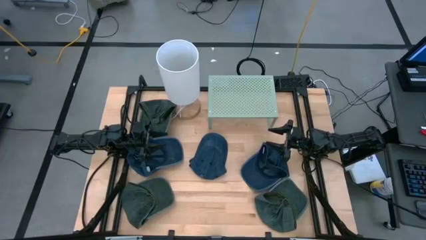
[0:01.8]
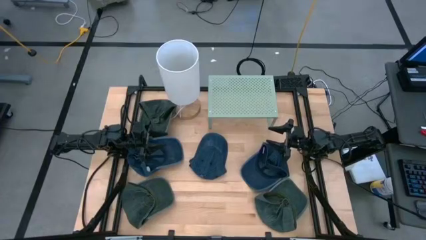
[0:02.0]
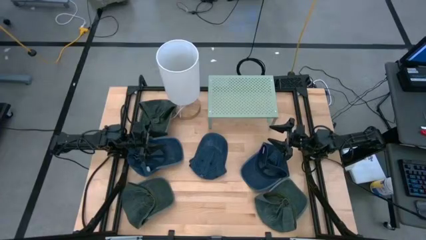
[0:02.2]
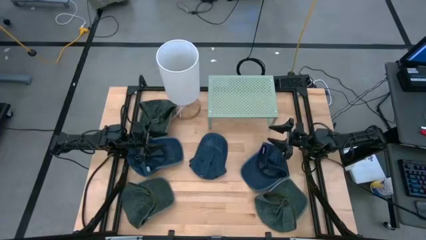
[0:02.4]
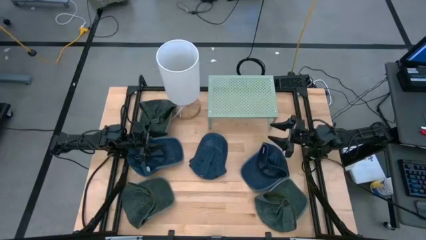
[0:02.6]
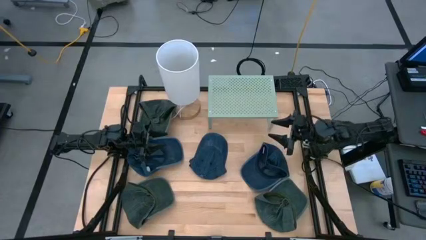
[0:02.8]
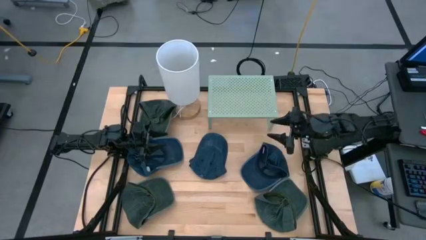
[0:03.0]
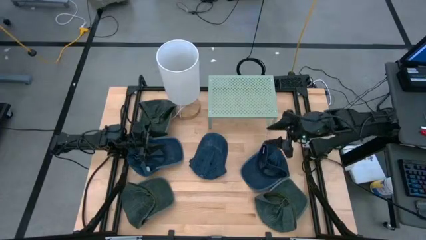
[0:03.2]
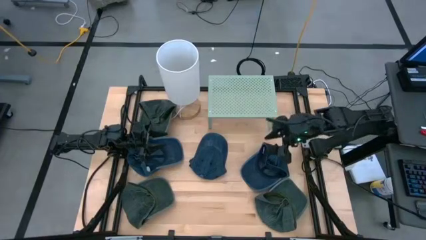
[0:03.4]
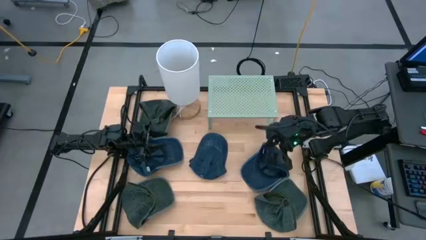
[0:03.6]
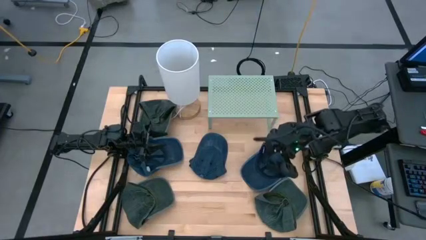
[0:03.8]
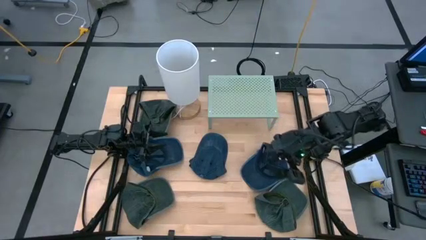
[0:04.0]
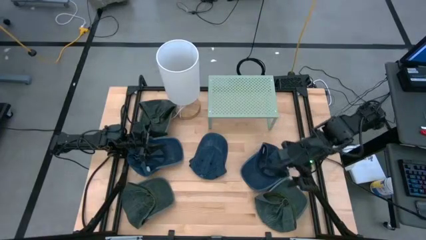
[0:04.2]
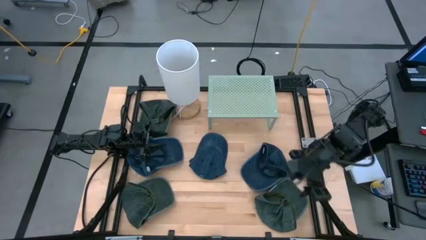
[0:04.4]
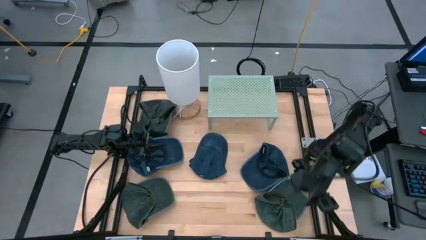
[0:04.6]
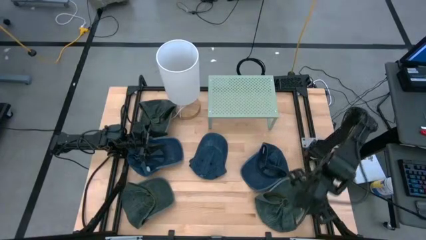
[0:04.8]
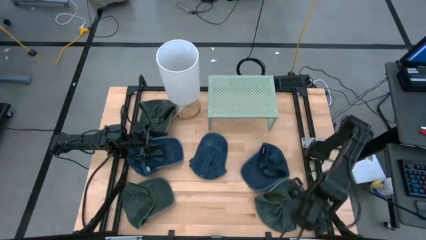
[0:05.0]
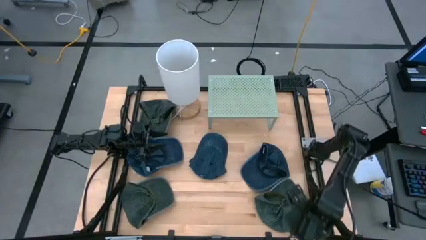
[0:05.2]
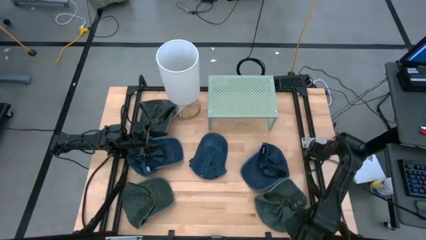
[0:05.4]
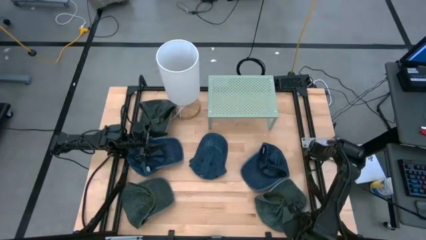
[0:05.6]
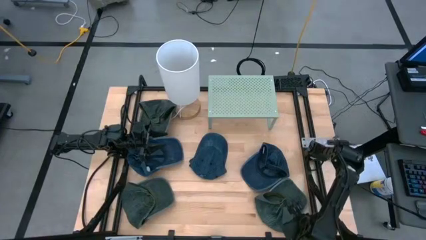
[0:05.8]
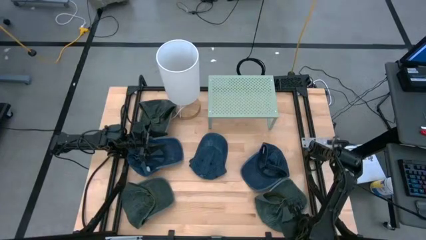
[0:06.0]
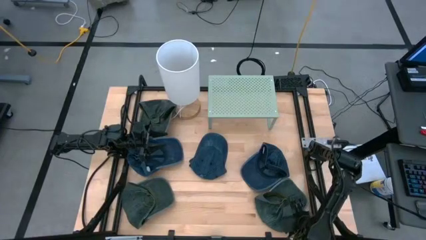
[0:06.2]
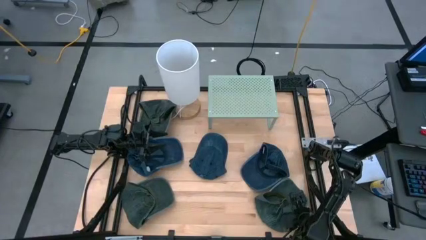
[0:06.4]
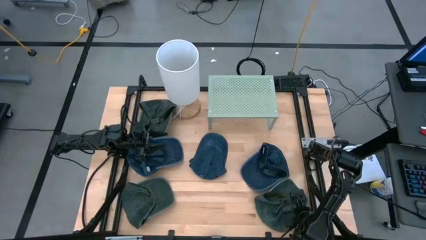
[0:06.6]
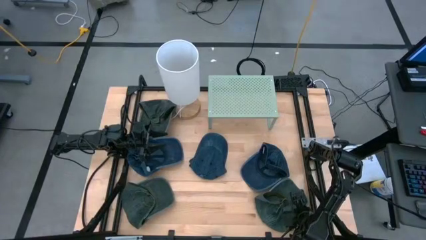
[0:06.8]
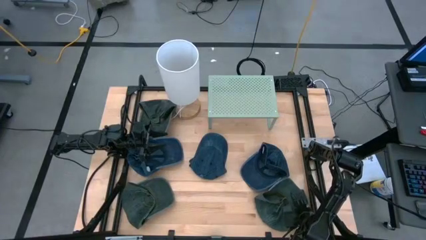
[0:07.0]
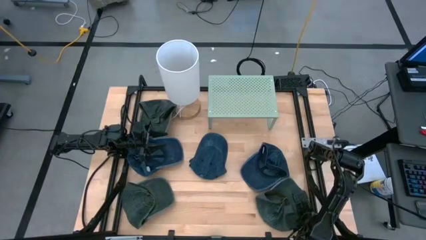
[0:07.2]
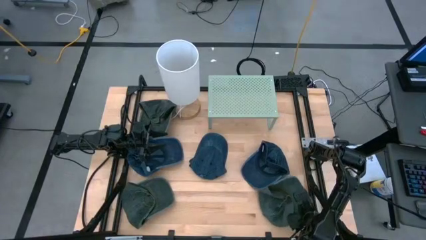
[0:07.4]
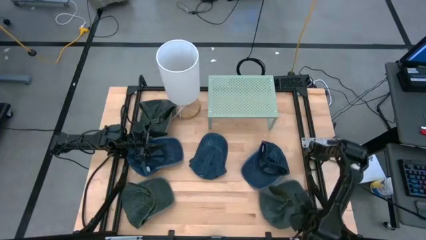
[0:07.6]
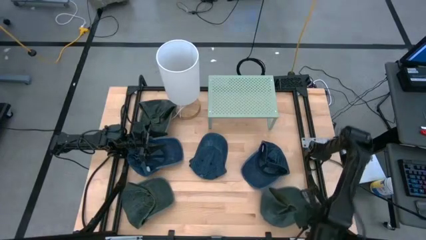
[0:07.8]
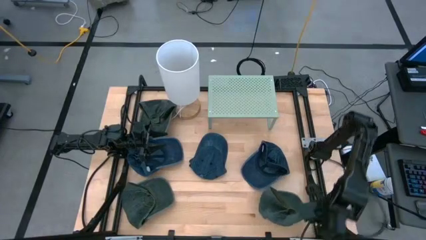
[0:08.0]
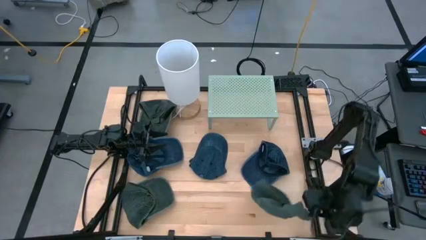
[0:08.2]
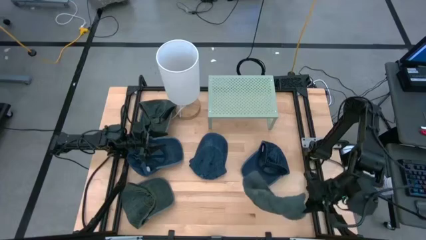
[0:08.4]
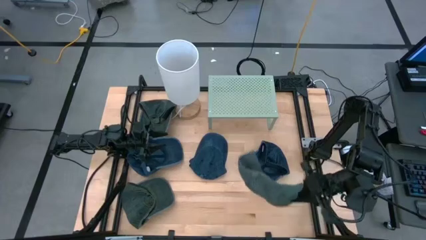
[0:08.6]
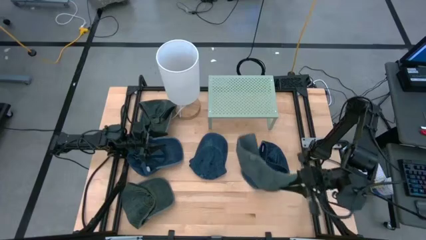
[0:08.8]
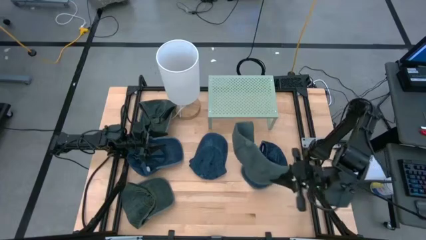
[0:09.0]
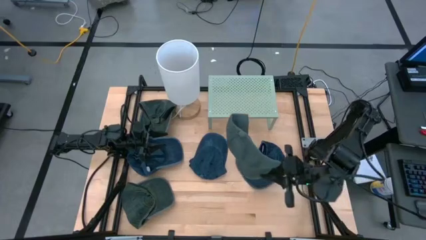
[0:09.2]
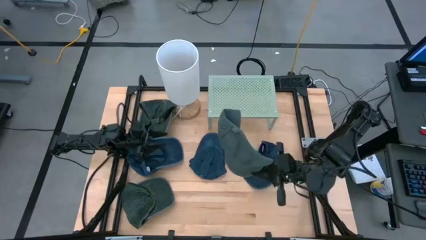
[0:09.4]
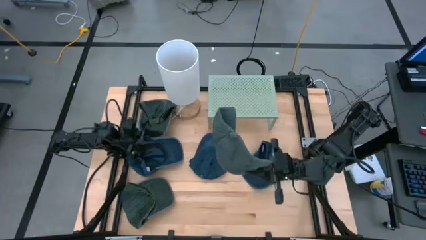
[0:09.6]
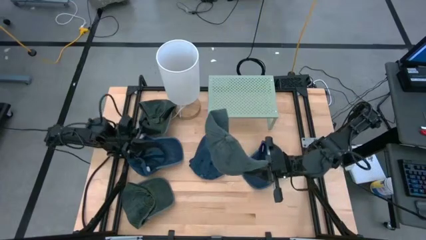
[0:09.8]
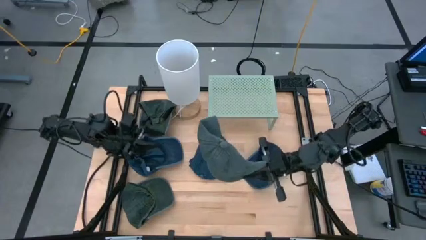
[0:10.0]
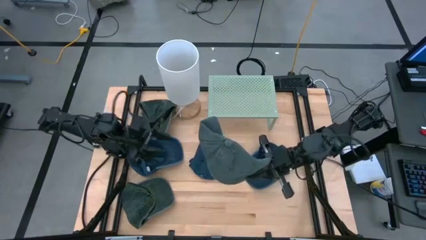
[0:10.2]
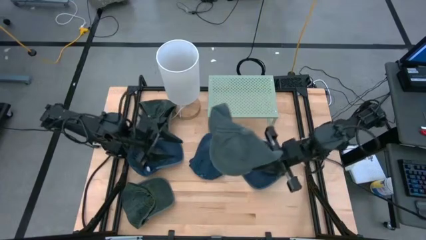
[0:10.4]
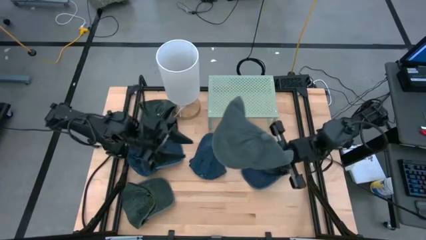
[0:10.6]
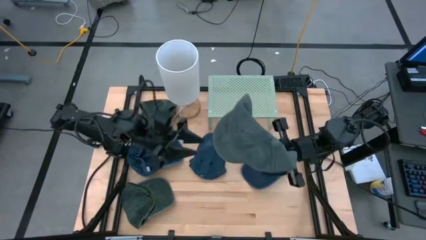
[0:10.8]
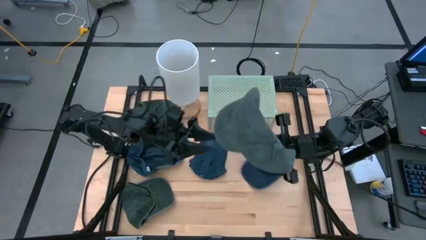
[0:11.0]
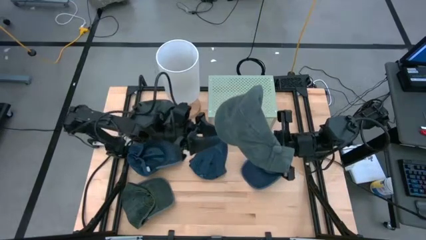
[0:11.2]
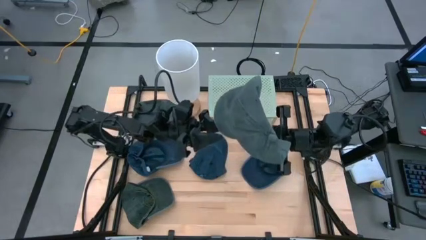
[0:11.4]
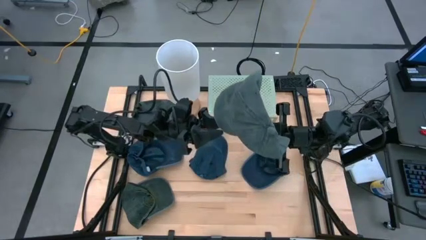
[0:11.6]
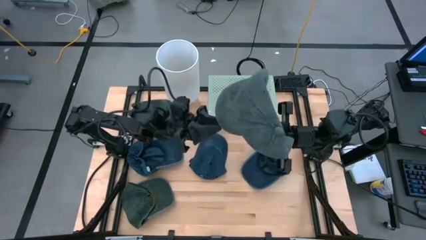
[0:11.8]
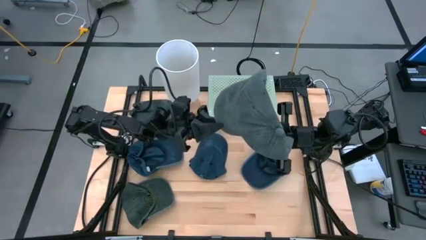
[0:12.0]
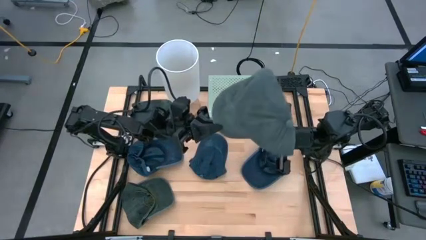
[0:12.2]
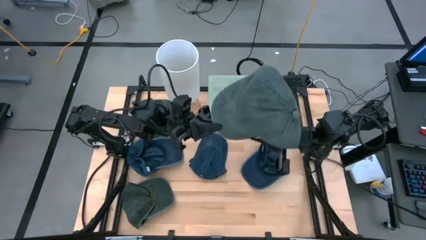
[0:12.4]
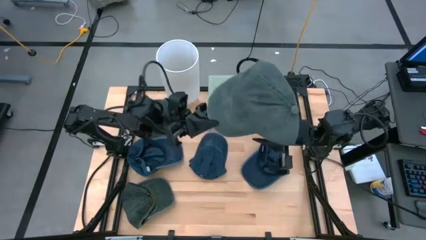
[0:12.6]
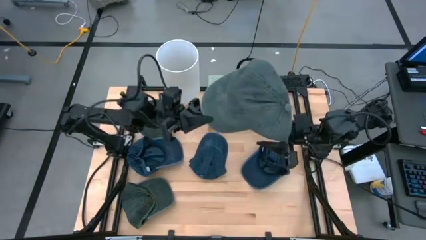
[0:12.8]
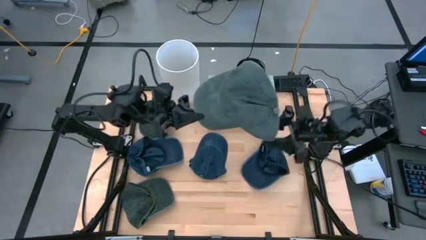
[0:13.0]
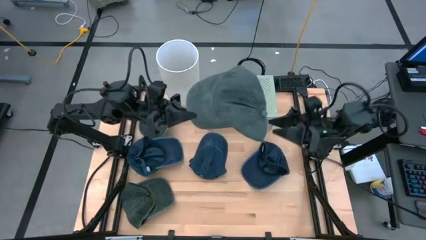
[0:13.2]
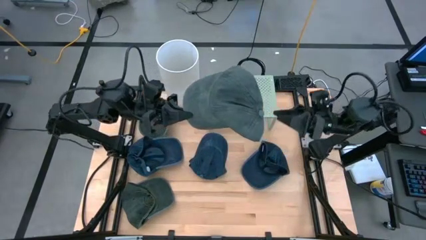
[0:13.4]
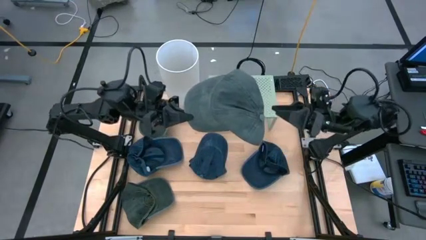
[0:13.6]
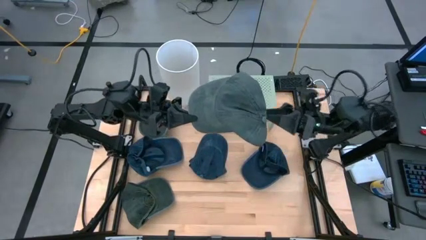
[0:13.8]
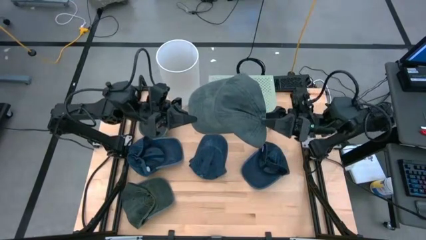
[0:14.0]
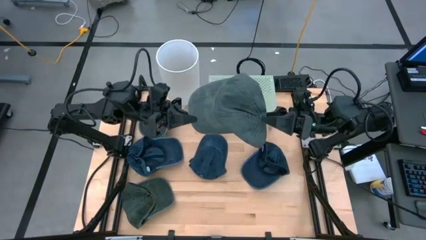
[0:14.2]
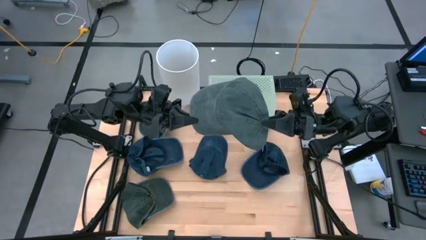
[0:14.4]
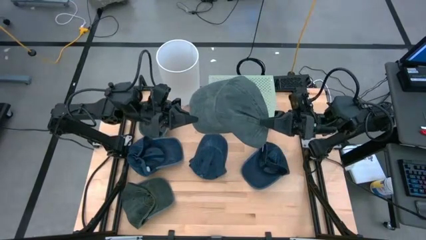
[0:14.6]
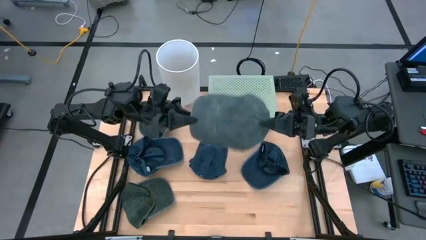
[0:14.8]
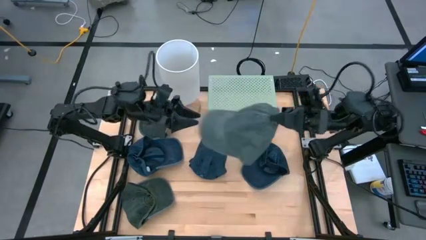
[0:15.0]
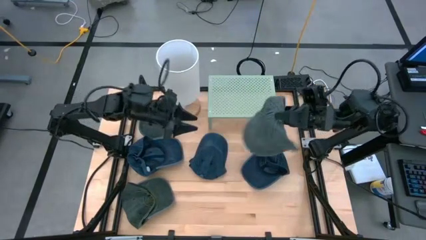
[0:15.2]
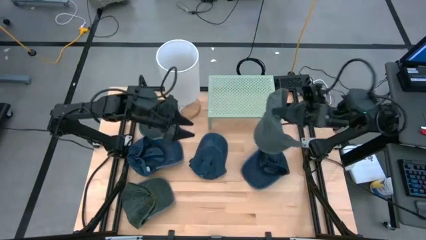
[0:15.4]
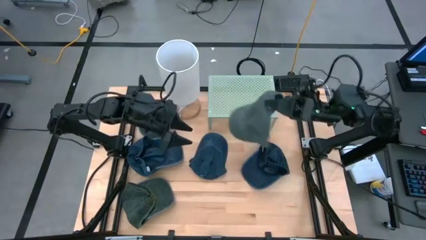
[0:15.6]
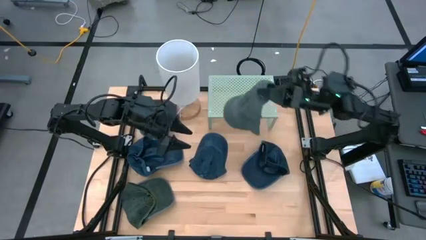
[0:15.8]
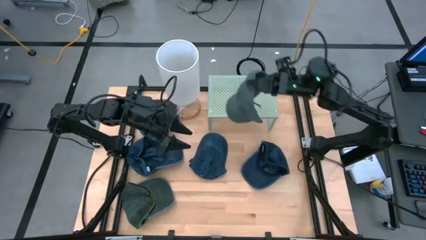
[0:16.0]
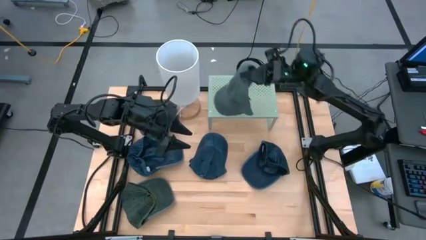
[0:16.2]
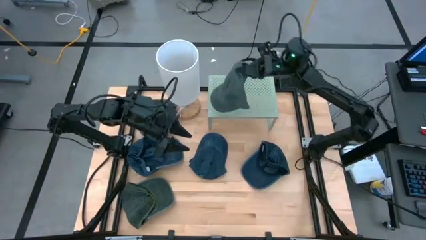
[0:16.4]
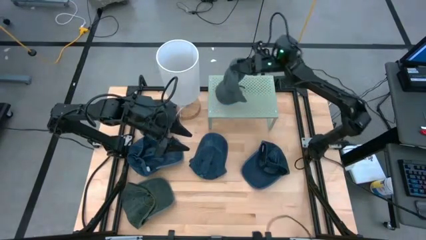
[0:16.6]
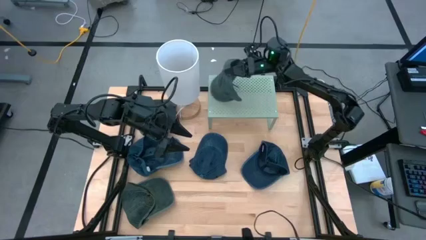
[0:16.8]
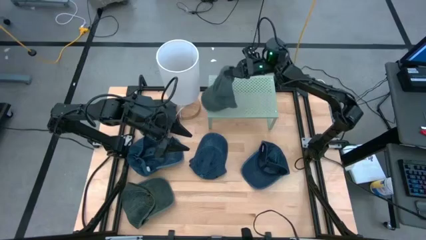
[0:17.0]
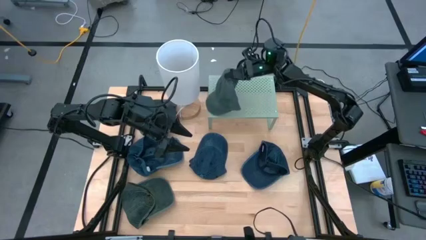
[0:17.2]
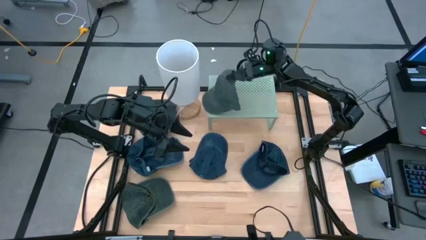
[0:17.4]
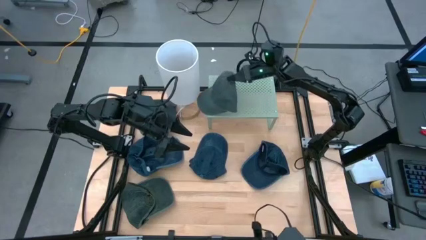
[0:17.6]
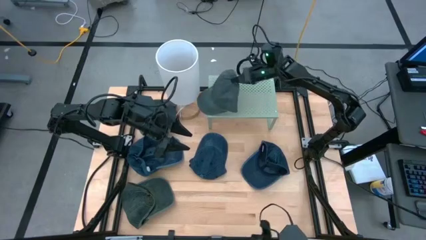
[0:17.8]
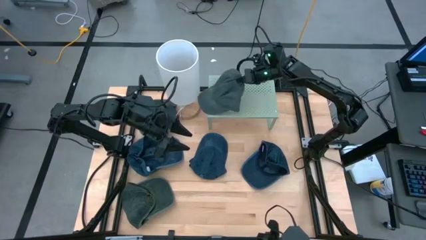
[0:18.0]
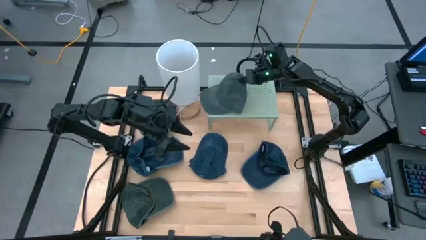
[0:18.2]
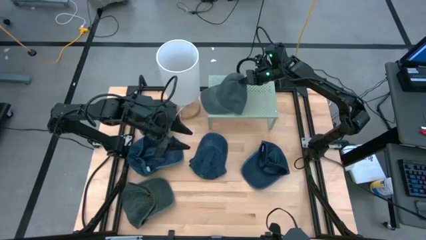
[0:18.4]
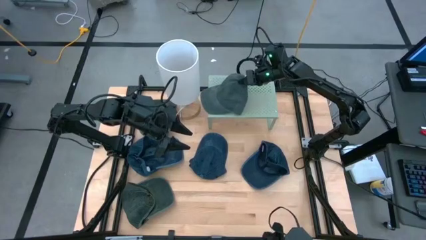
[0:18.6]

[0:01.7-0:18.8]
Task: Pick & Place hat
Put the bottom right green cap on the shelf
